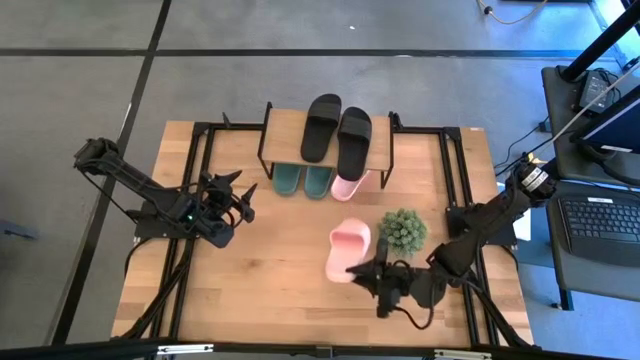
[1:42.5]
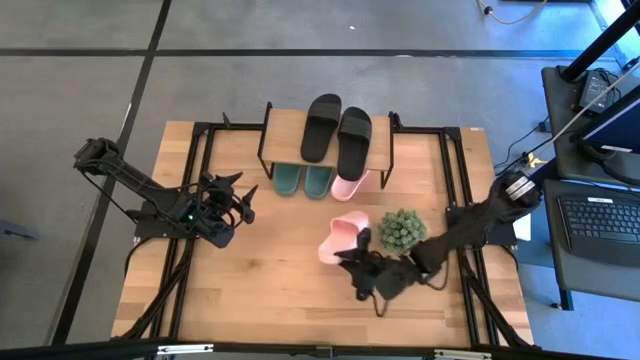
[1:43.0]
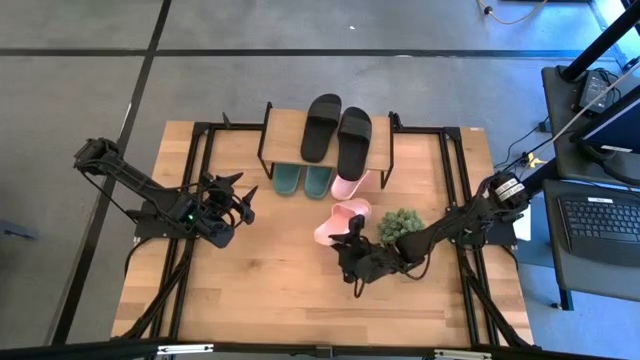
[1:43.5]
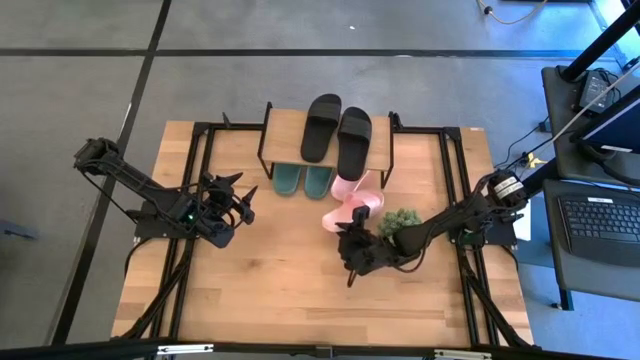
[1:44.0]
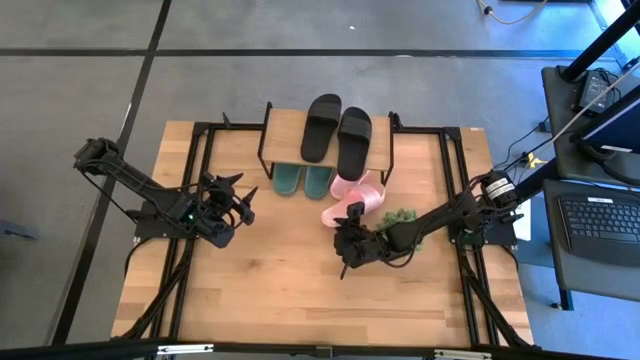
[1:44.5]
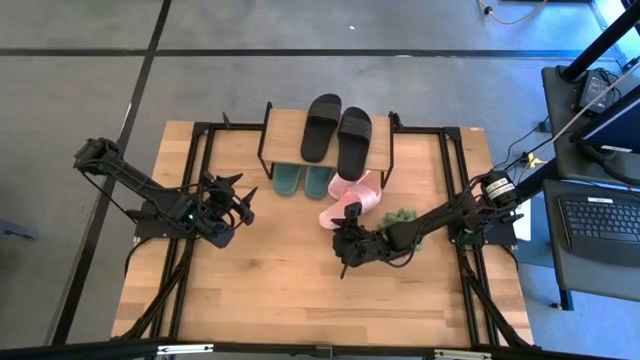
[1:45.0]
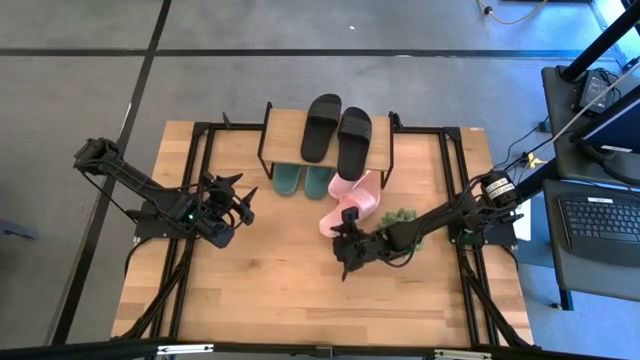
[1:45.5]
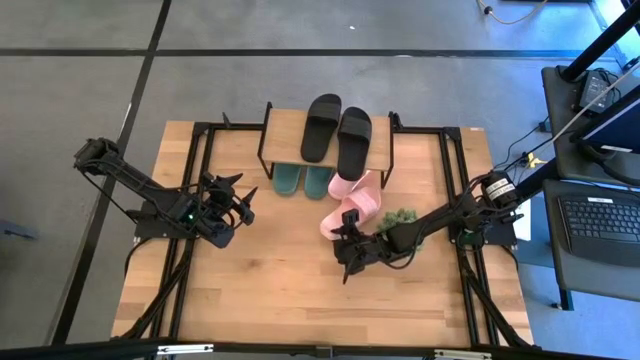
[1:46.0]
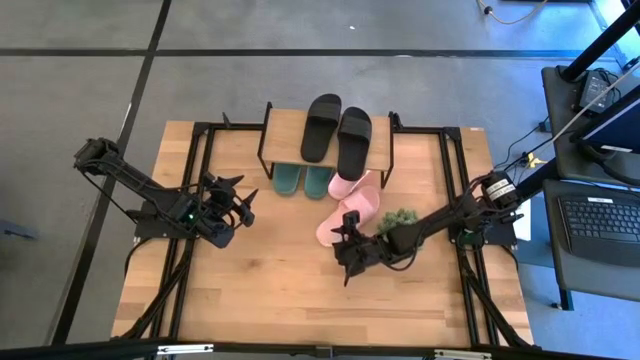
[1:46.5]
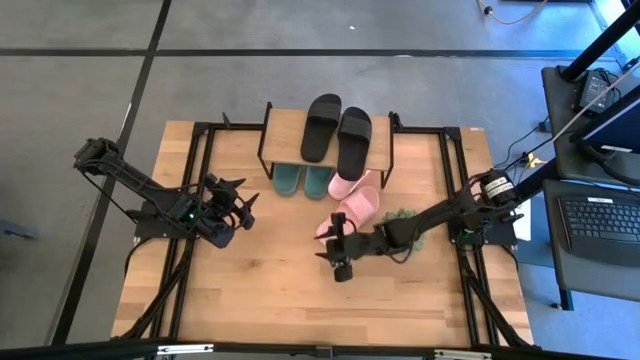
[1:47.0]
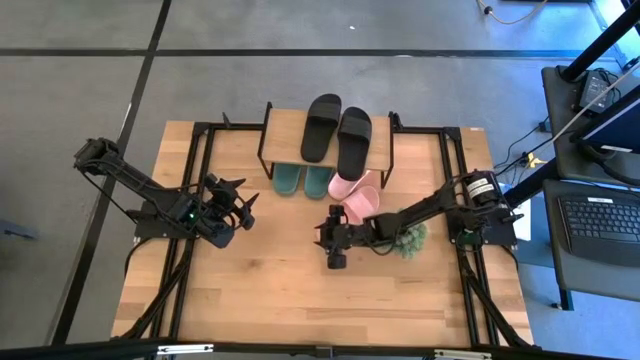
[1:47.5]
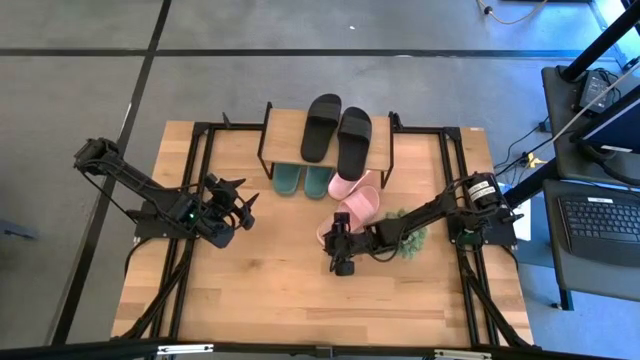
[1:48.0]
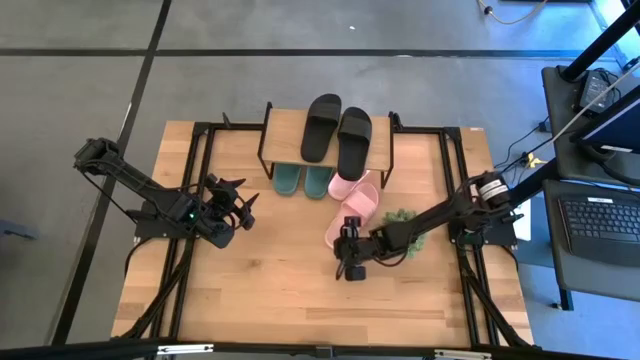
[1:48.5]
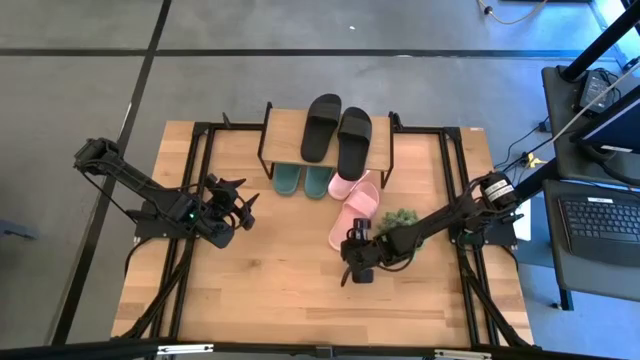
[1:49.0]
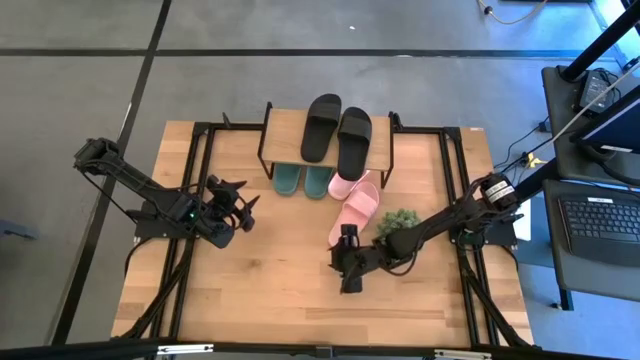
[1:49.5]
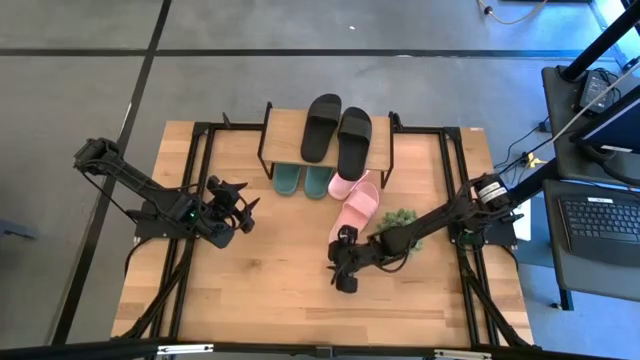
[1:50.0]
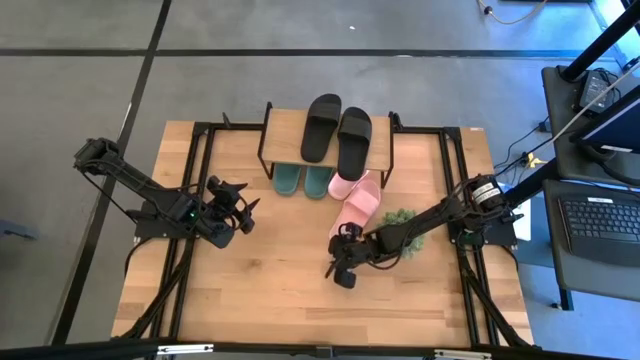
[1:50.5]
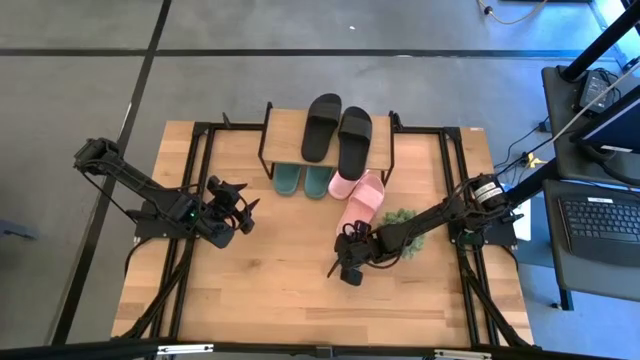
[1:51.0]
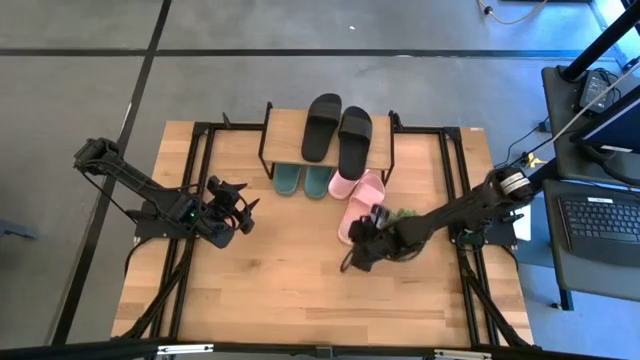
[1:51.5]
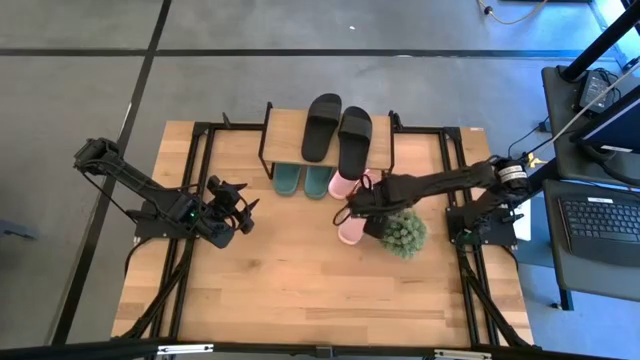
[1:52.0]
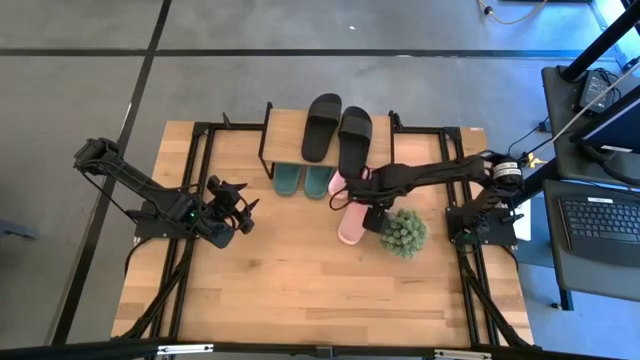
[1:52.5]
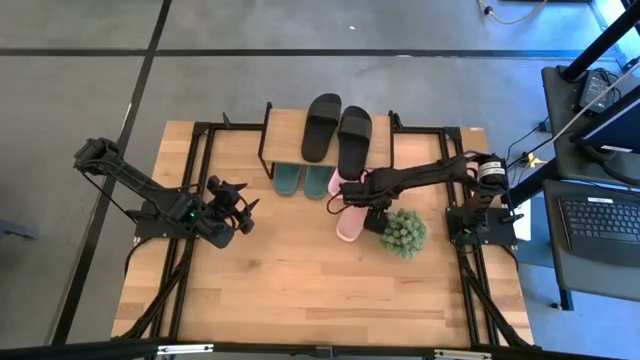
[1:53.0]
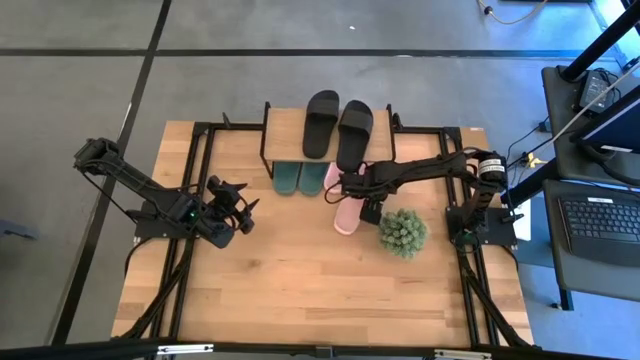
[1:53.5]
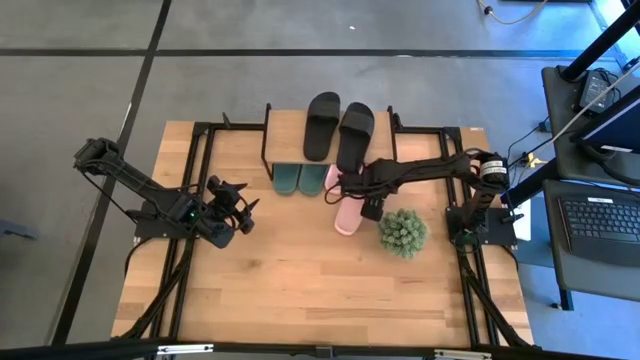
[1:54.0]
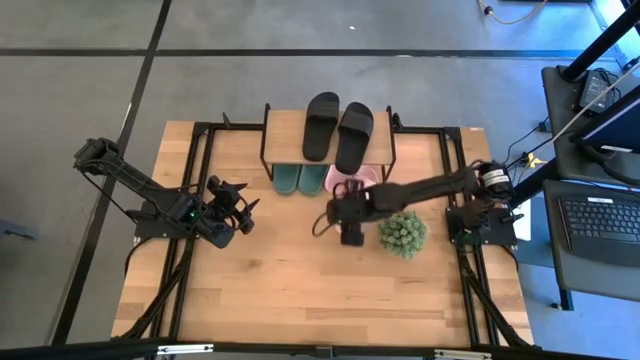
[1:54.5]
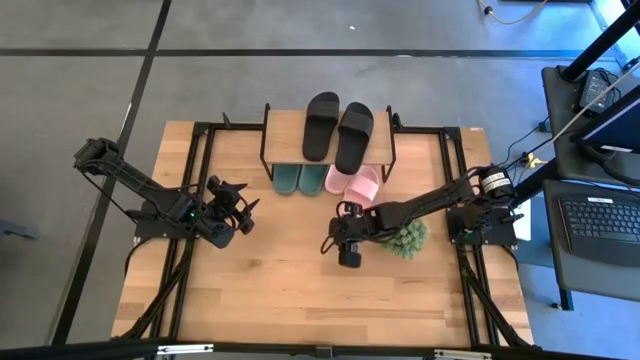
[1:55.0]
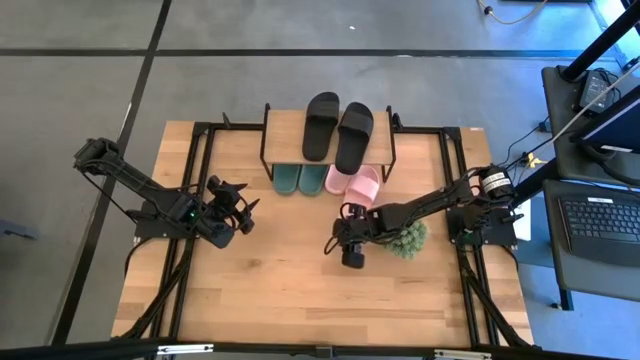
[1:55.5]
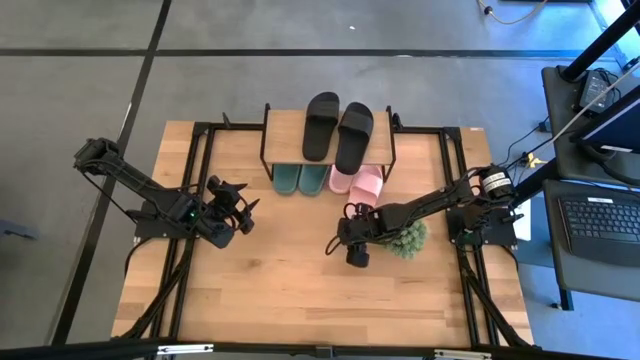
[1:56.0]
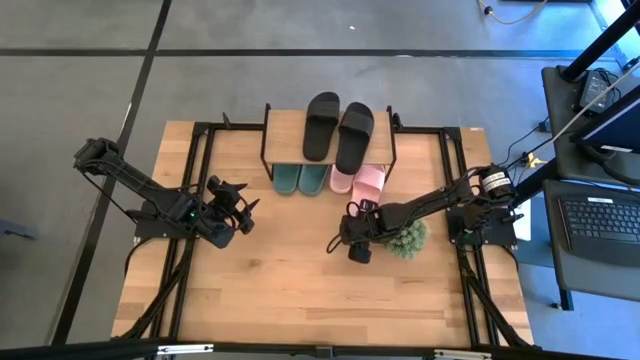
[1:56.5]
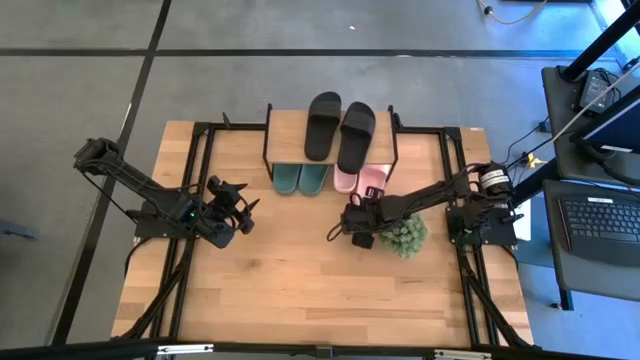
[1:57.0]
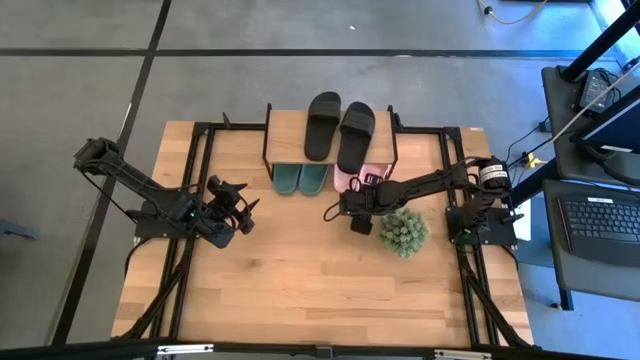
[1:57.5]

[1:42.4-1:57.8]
Task: Pick and place slides into the shelf
Put the pink slide under the shelf

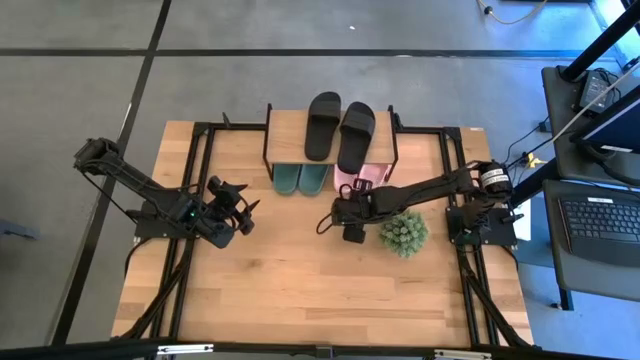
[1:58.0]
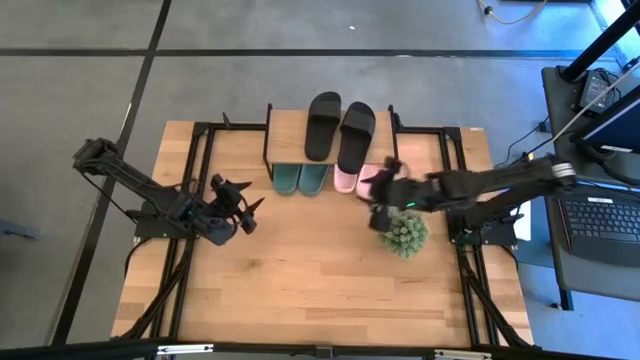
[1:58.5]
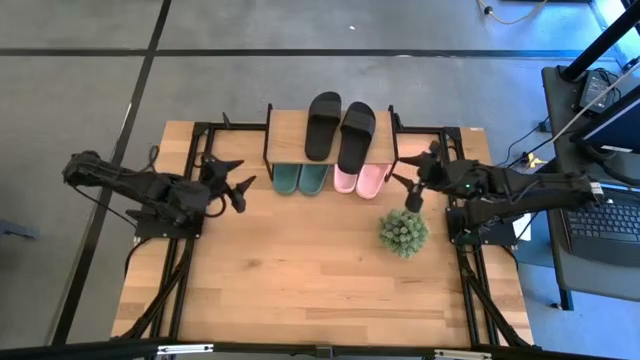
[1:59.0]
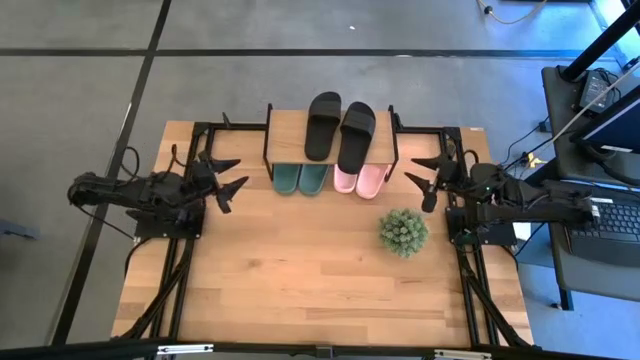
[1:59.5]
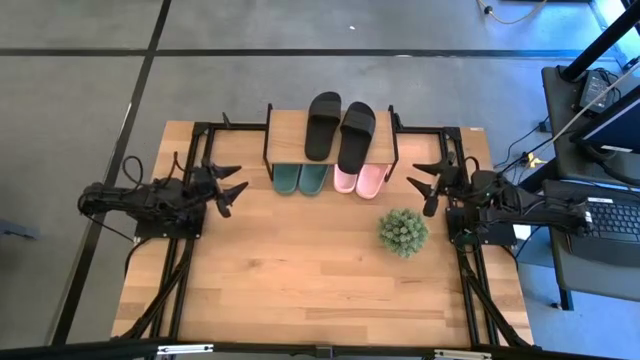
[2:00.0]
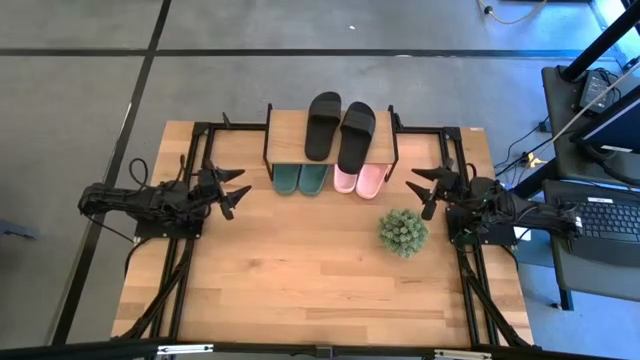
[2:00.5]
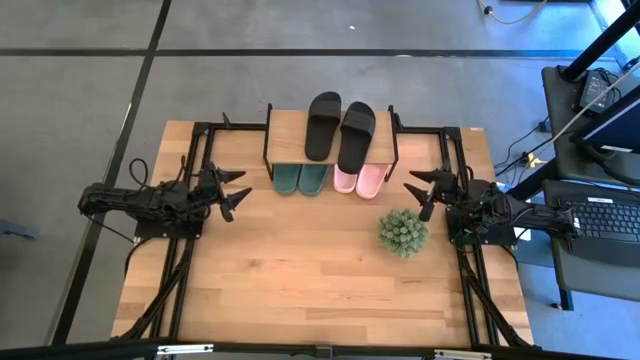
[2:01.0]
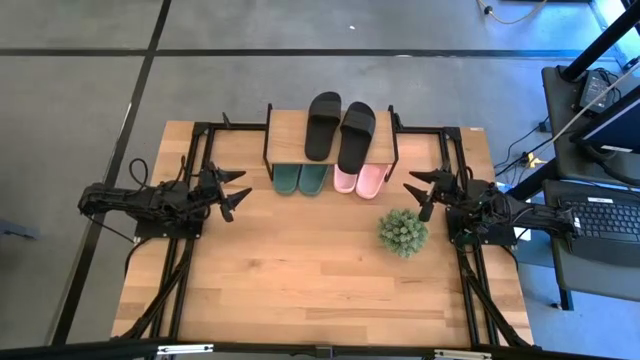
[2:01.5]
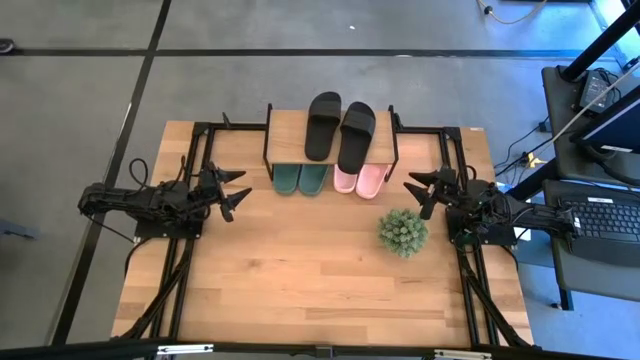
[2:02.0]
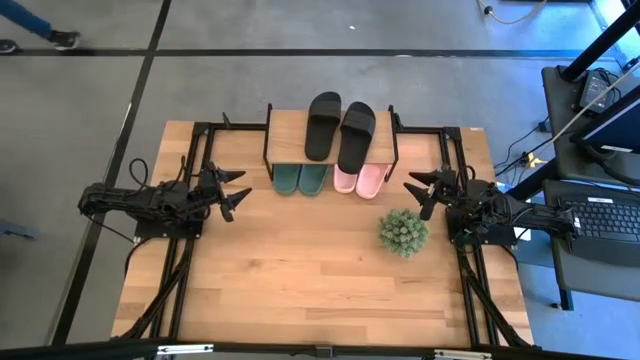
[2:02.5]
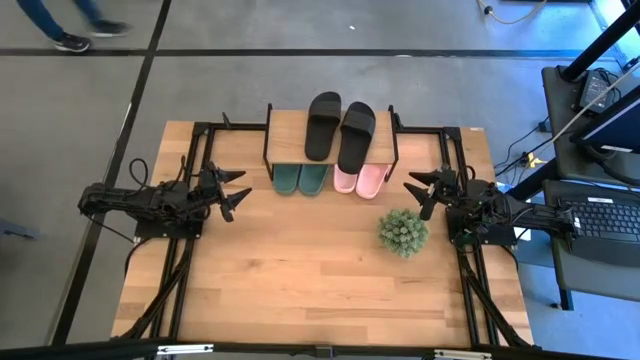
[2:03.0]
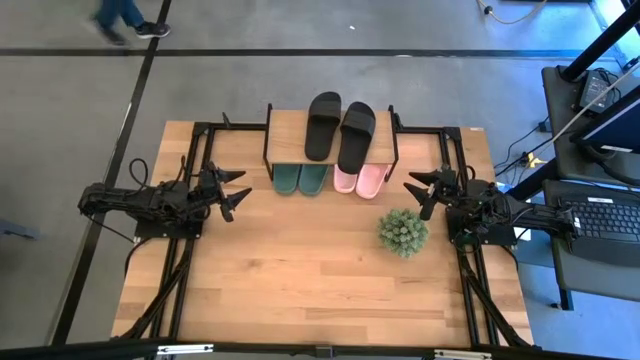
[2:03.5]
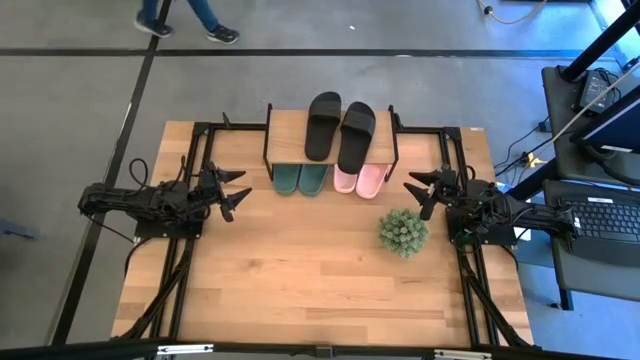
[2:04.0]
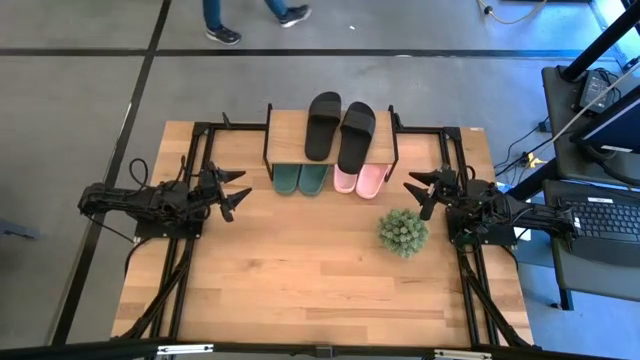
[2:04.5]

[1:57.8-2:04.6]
Return to Home Position
